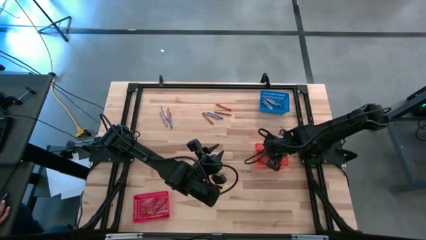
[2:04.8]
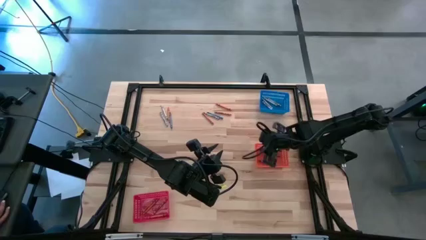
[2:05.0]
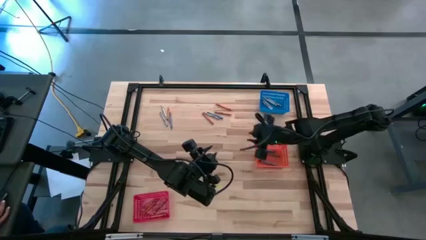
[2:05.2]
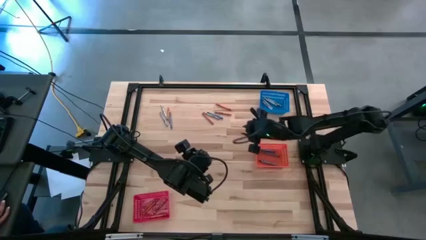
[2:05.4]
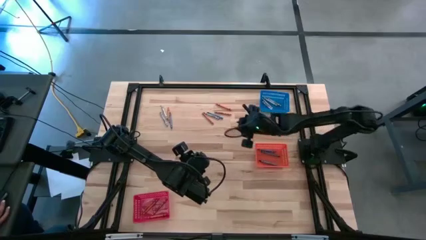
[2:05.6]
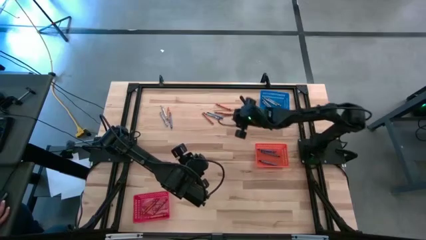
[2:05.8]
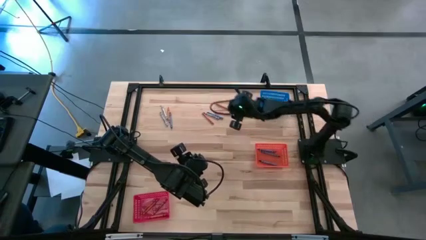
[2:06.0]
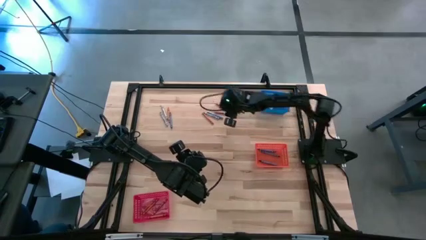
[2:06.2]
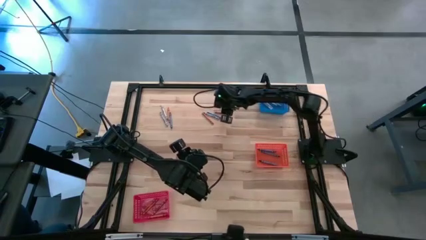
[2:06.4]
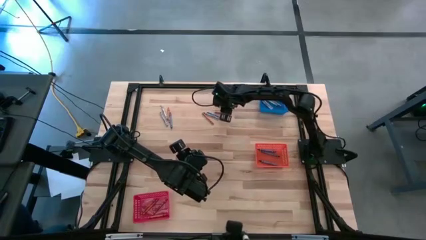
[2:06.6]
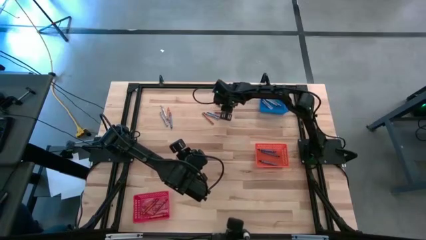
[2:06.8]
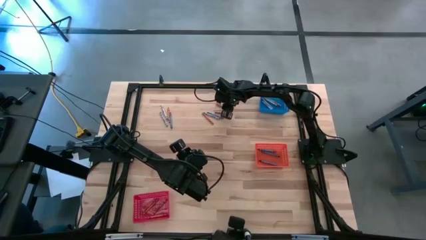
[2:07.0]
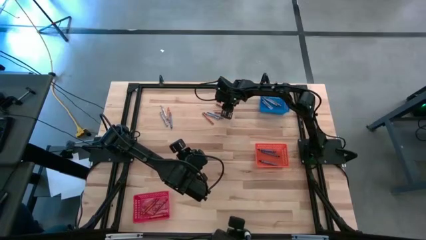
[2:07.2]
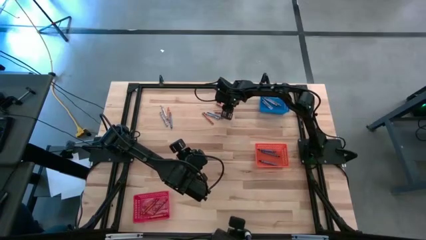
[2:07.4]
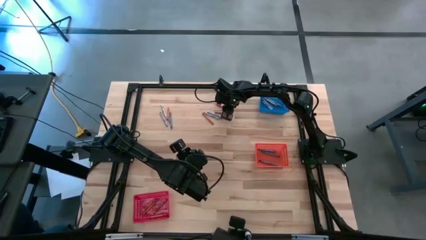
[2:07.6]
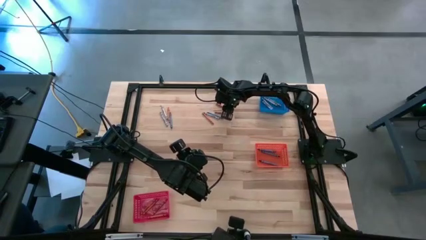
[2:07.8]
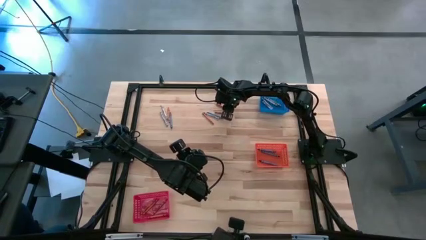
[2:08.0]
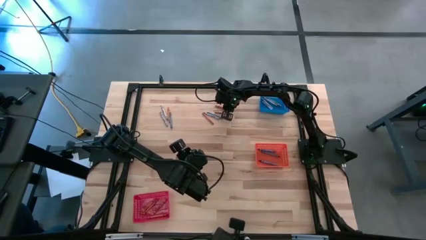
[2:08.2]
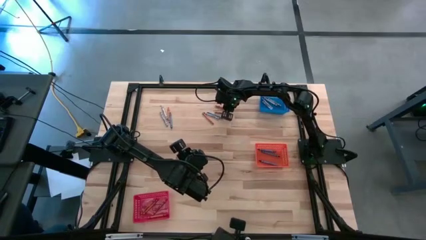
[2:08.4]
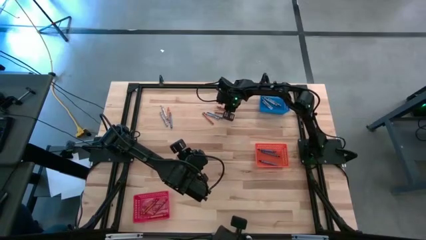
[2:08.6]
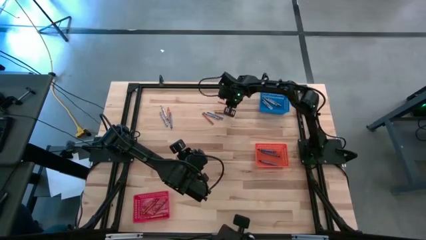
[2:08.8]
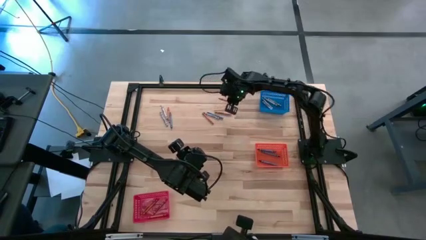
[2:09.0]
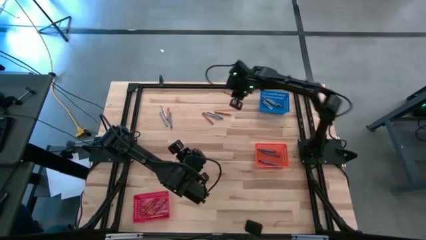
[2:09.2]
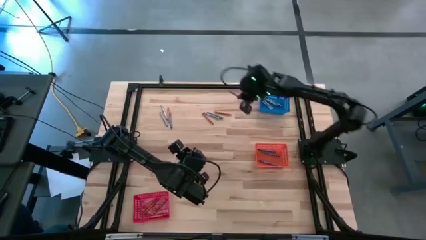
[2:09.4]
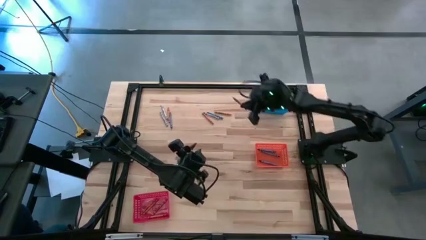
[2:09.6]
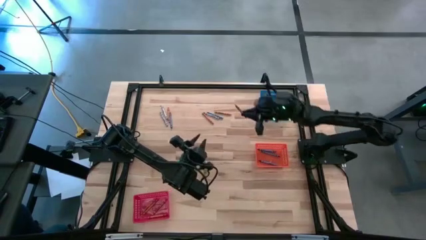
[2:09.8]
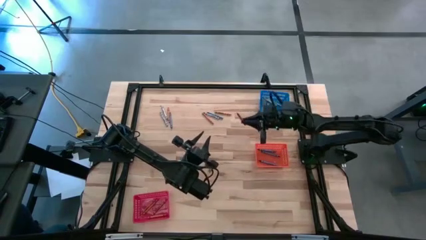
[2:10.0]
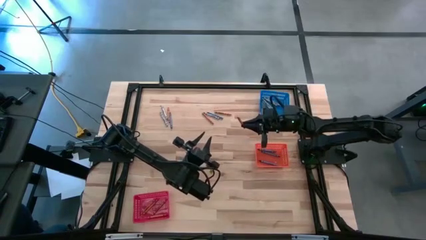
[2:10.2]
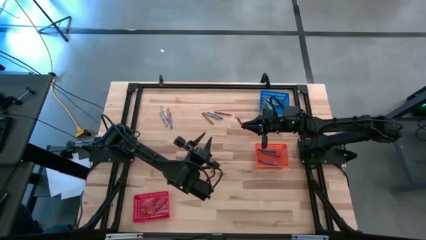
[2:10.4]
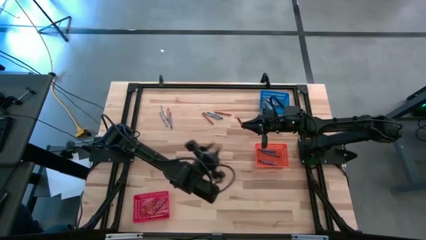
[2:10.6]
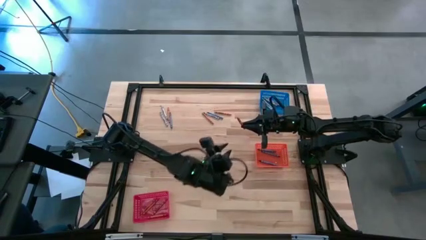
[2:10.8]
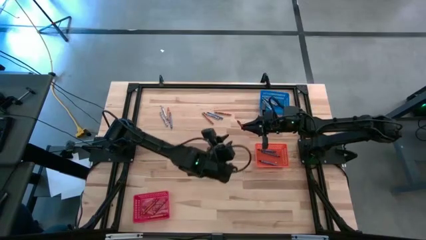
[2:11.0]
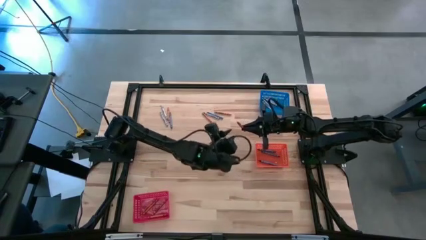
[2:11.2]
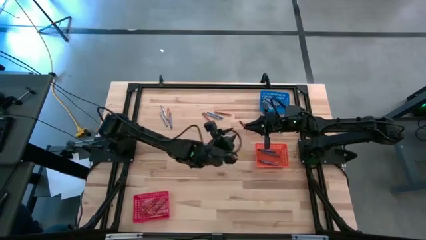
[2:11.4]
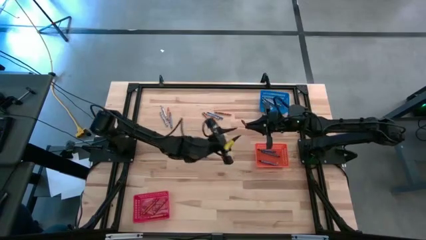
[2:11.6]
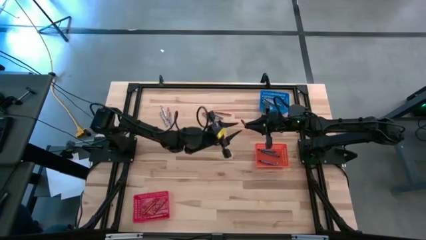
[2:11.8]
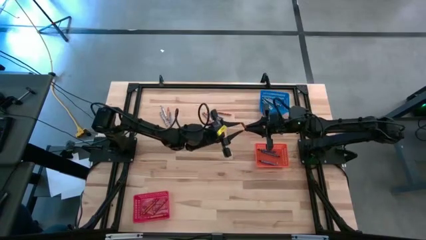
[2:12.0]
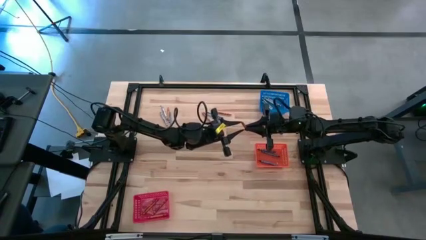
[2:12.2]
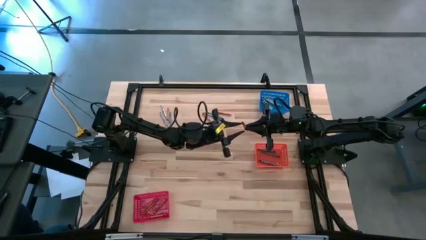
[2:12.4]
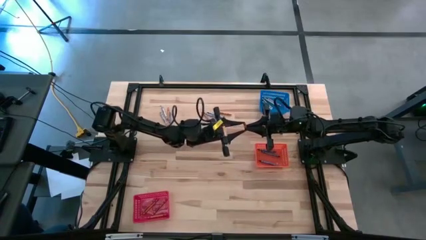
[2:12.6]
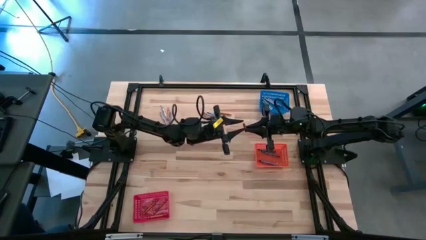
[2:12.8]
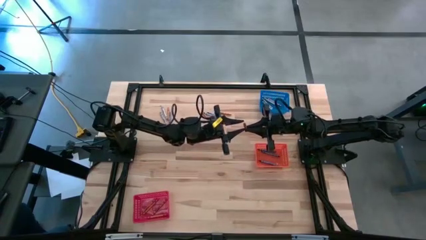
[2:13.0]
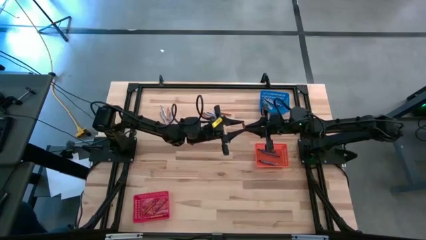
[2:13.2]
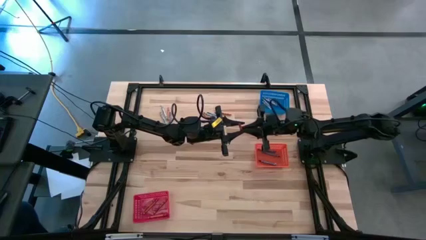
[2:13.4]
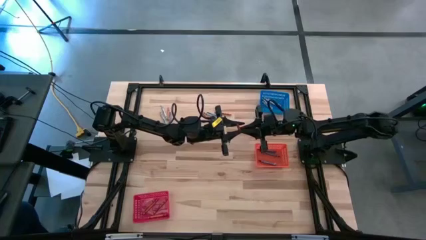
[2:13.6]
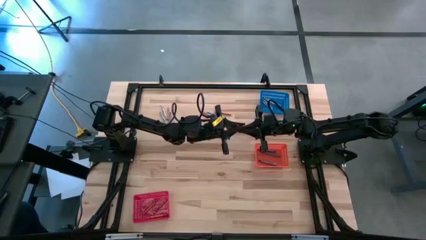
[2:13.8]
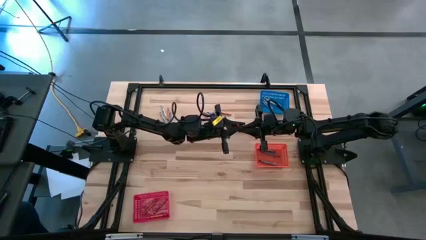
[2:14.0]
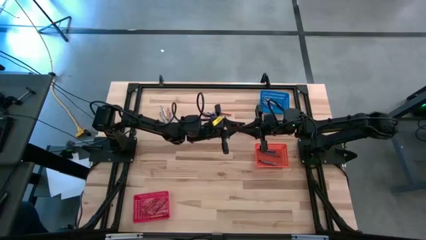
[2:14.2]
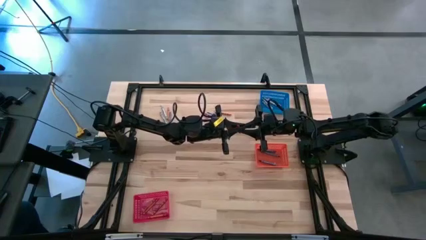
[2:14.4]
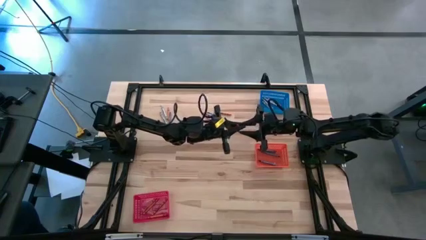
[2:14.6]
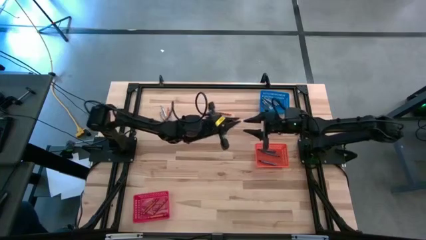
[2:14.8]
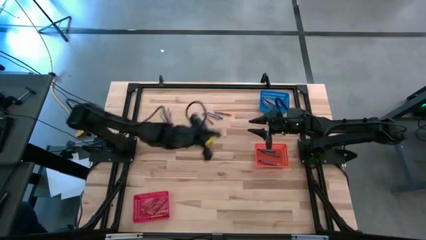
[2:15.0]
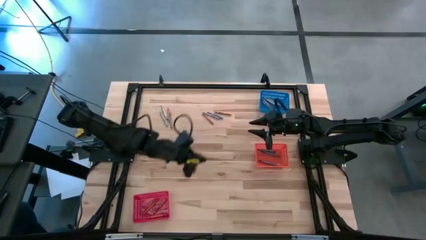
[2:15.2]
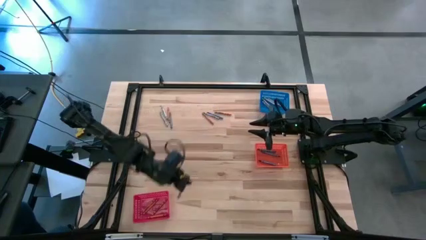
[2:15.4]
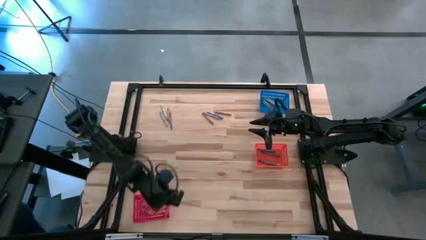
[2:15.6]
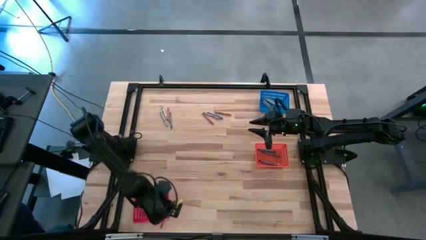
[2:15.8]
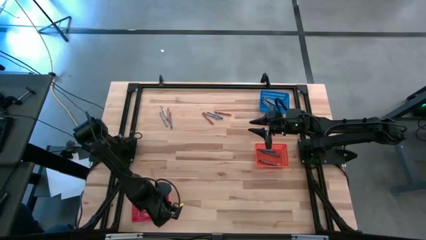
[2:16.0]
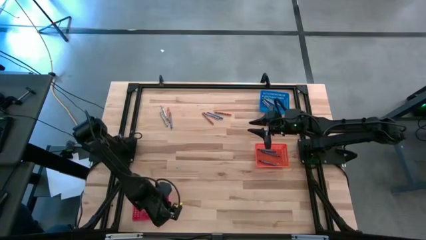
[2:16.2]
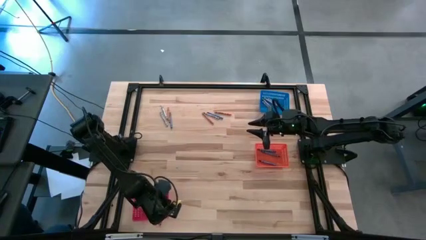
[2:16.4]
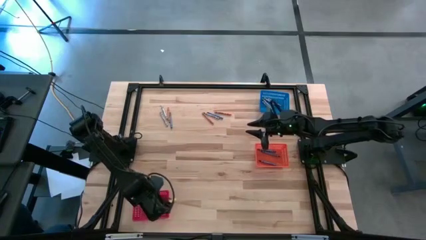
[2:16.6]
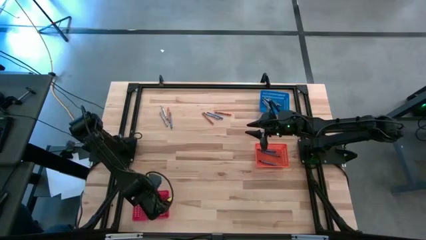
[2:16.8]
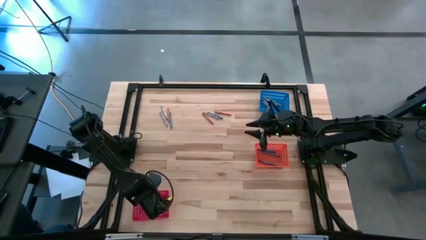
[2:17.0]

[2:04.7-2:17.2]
Task: Sort crayons
Put the orange crayon into the red bin

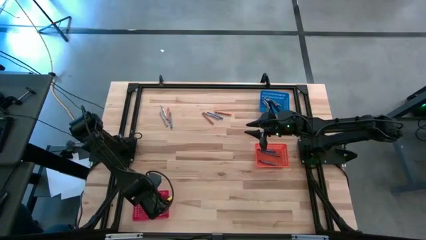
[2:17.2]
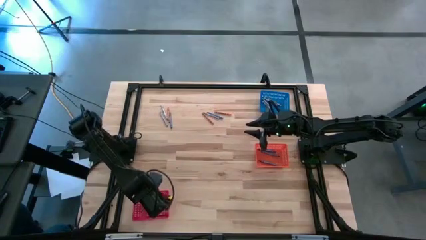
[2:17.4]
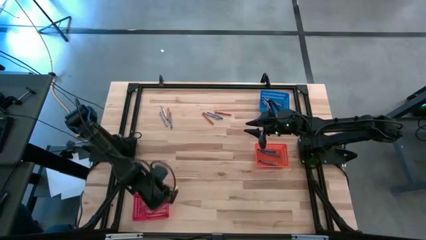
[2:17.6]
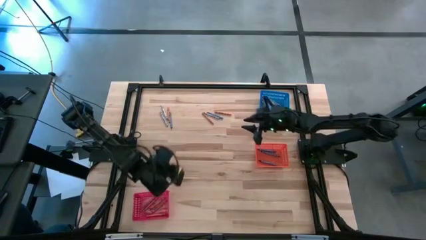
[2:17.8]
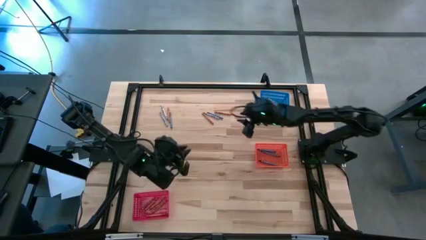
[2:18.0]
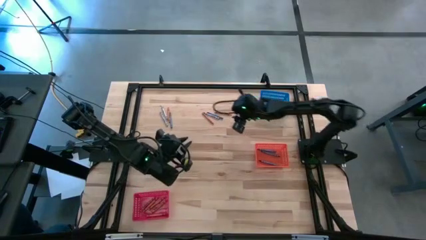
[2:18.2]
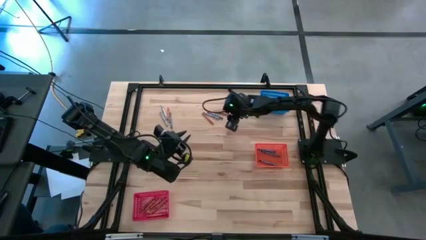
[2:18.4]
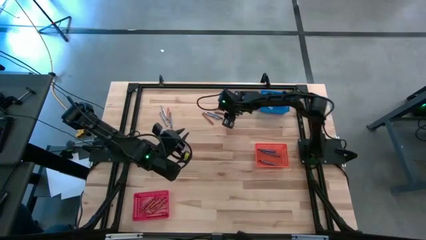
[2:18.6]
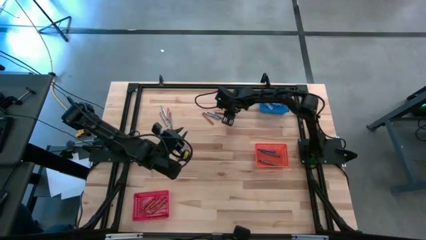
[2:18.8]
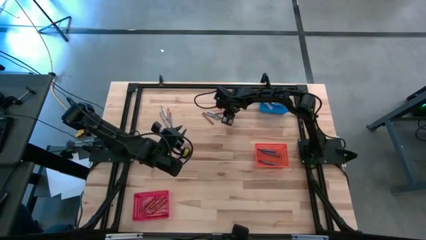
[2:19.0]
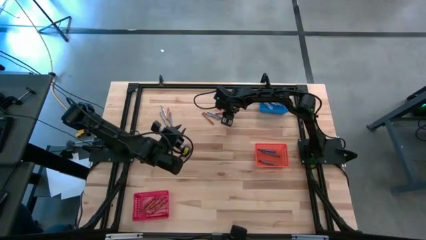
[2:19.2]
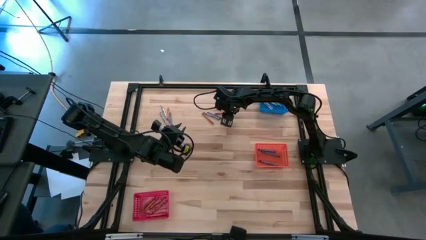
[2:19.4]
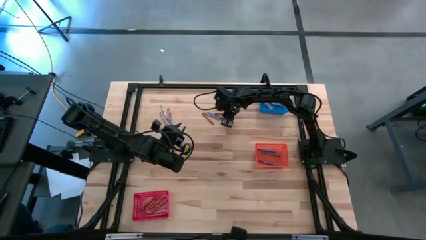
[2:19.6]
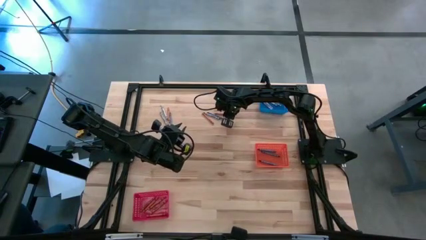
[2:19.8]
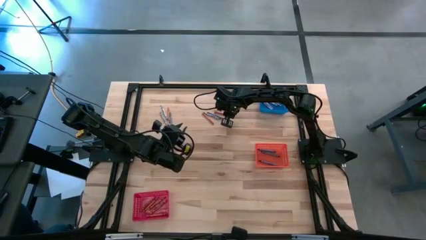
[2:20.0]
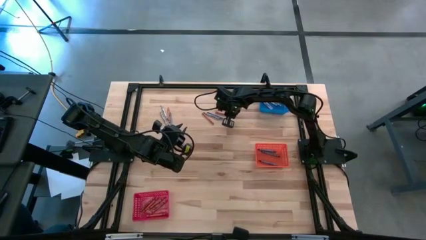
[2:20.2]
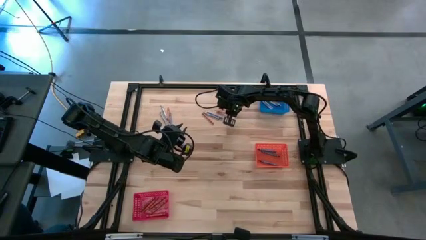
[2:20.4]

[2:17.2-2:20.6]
Put the orange crayon into the red bin
